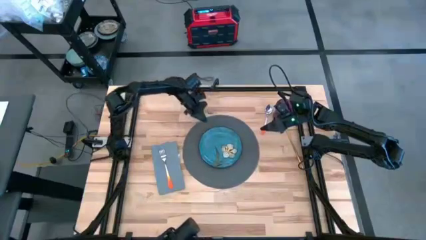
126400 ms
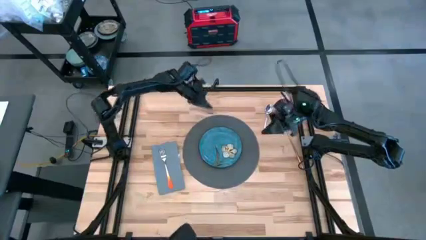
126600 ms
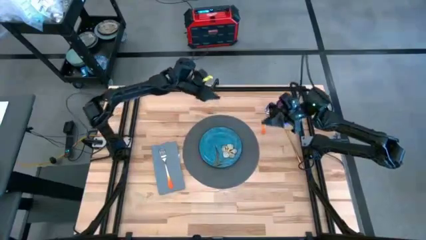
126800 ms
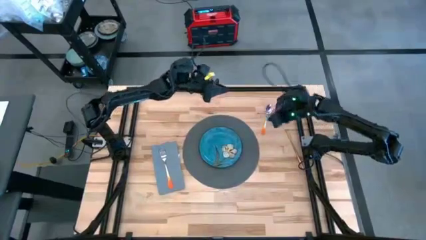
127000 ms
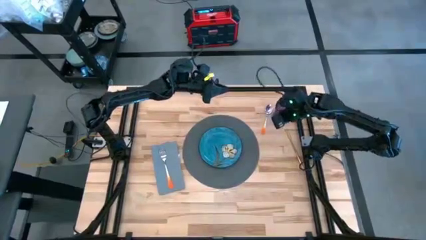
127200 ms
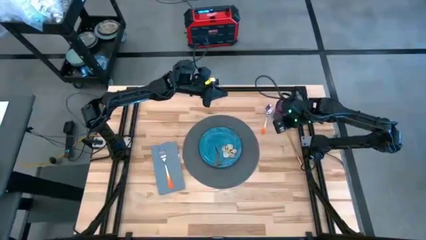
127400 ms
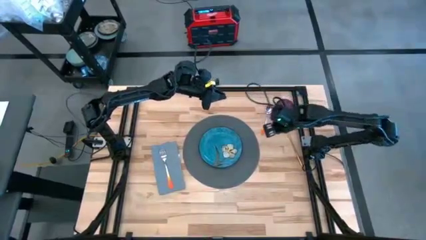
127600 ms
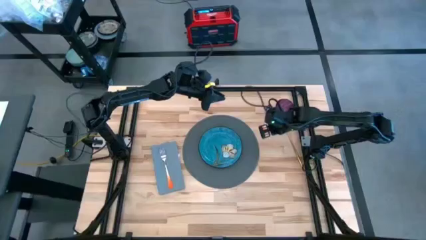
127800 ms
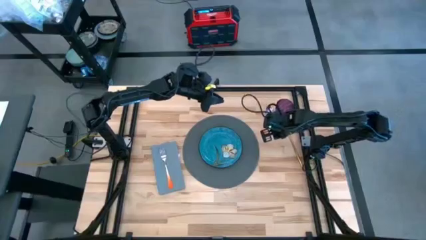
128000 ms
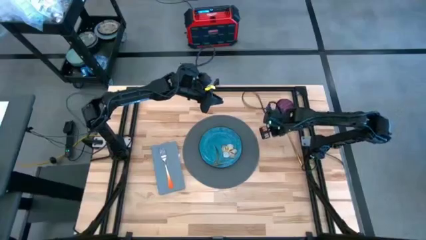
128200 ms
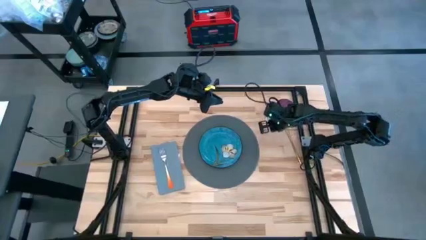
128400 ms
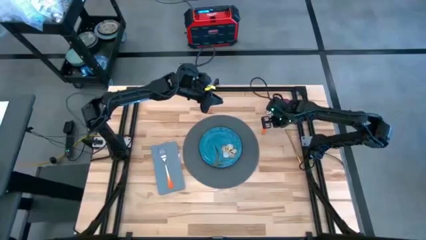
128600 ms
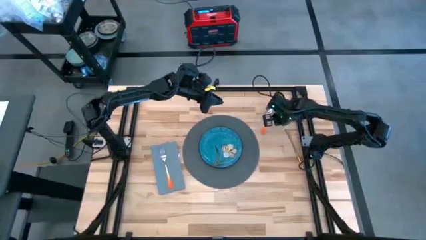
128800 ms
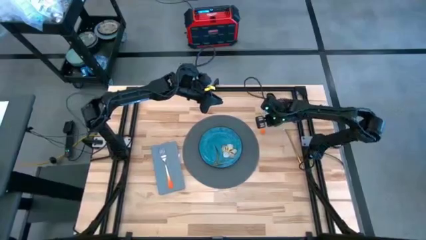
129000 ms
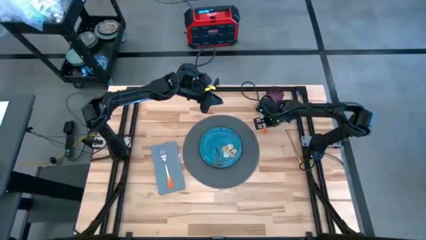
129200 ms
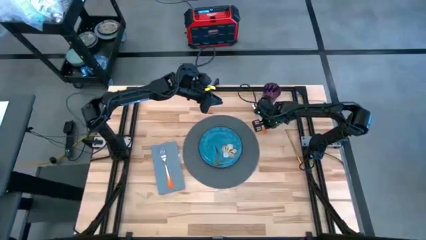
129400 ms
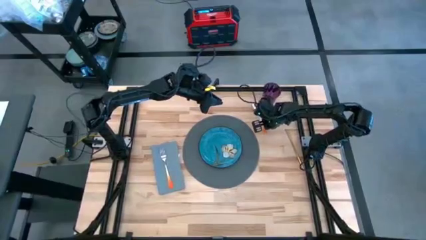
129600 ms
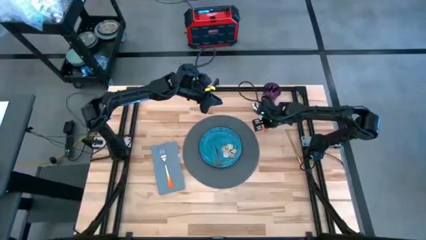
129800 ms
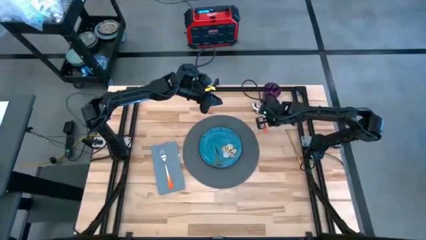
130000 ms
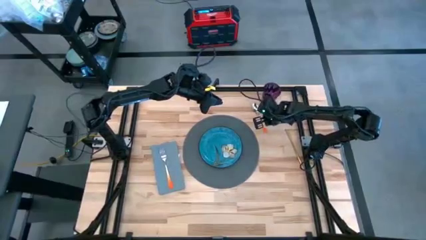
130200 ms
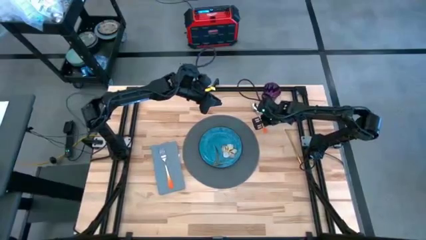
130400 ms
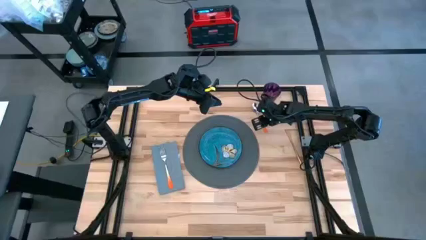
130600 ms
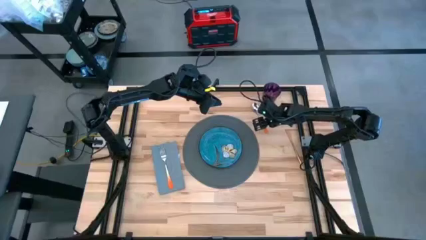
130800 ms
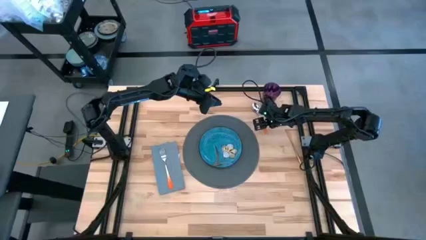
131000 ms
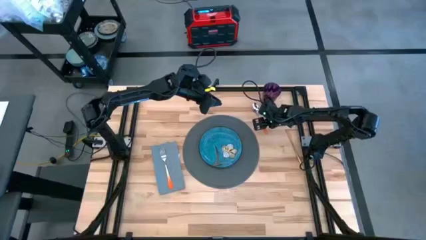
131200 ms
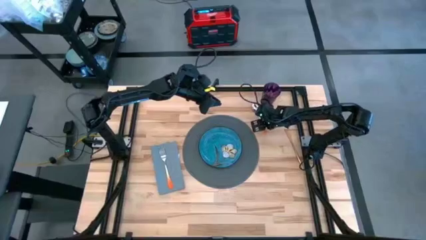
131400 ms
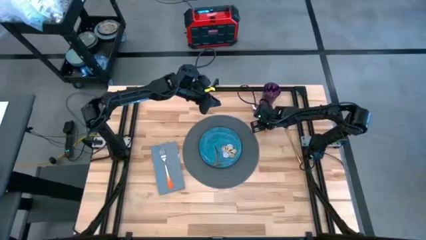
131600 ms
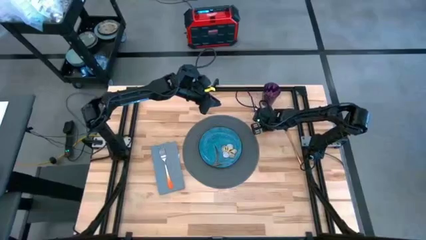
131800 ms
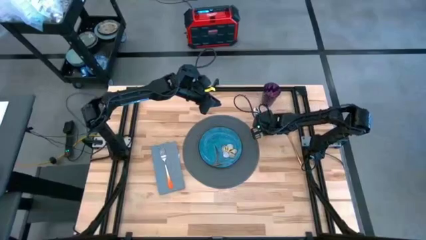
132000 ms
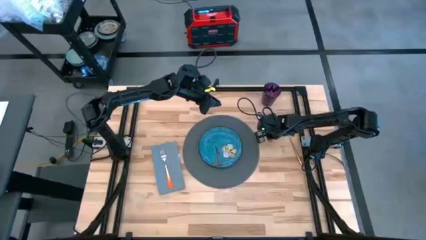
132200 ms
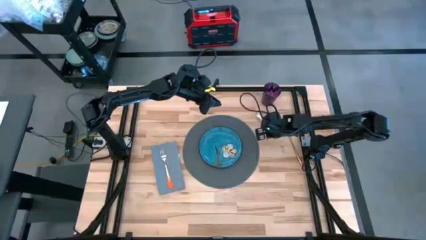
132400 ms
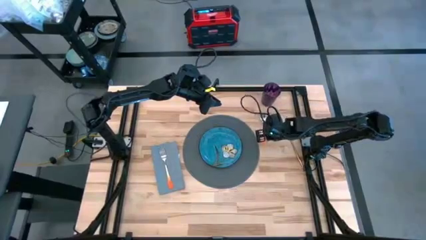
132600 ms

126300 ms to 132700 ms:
Task: Set table place
Put the orange spoon on the right side of the gray placemat

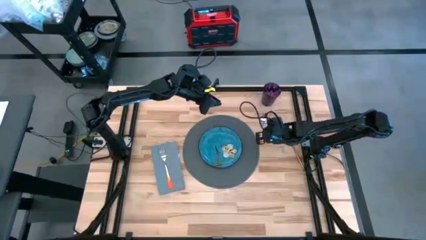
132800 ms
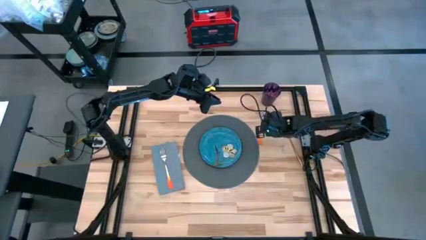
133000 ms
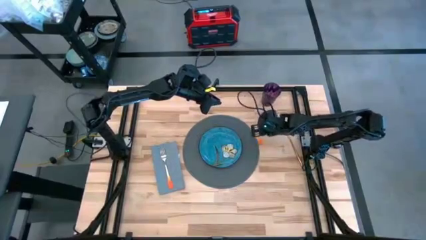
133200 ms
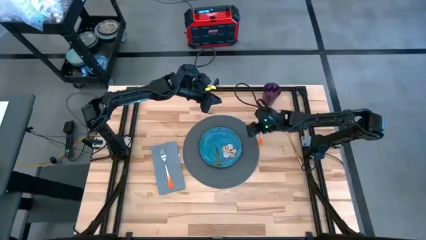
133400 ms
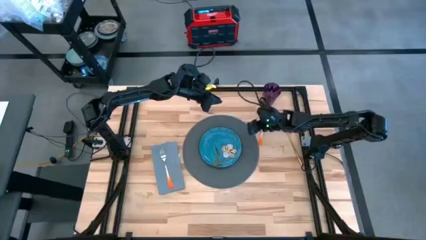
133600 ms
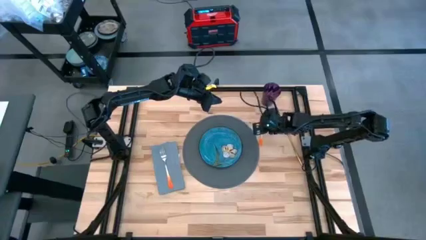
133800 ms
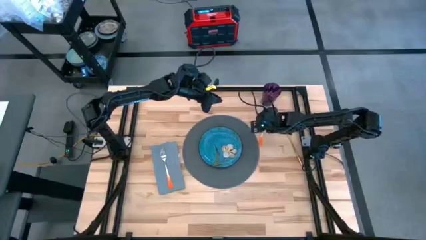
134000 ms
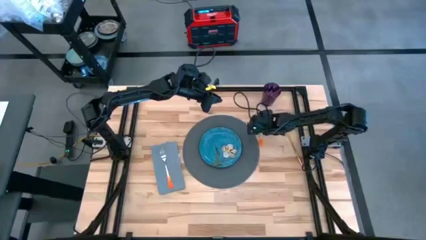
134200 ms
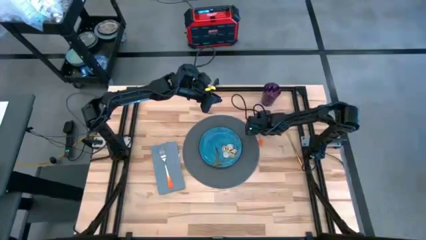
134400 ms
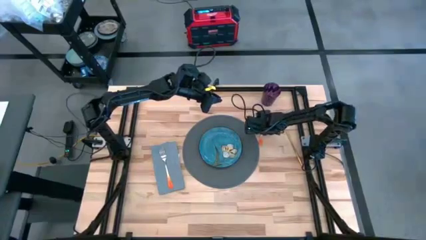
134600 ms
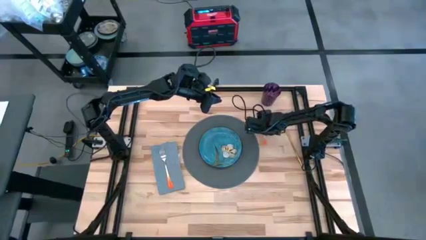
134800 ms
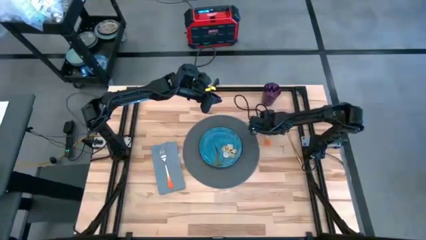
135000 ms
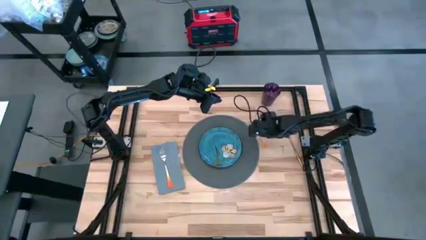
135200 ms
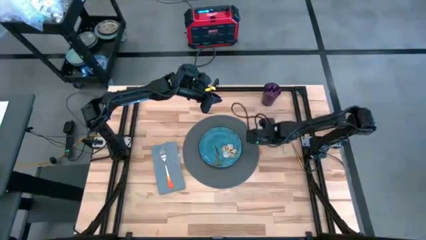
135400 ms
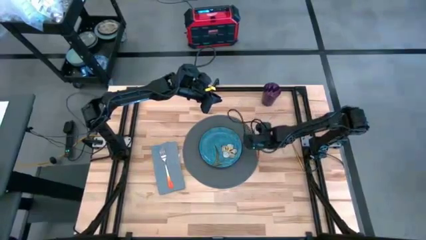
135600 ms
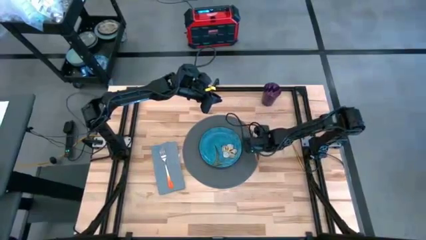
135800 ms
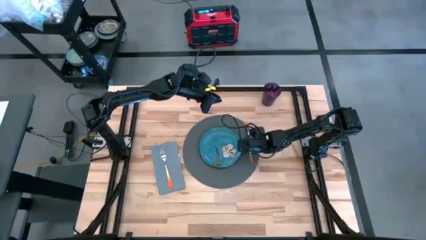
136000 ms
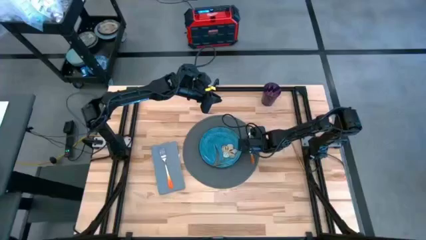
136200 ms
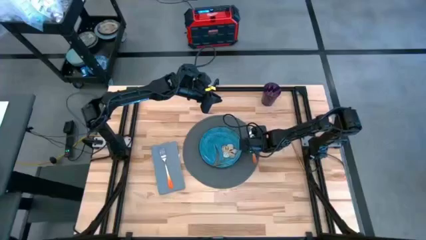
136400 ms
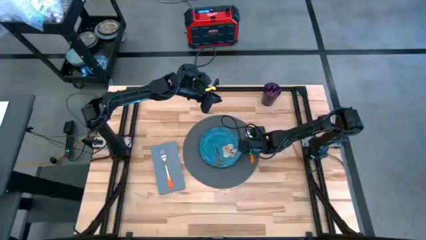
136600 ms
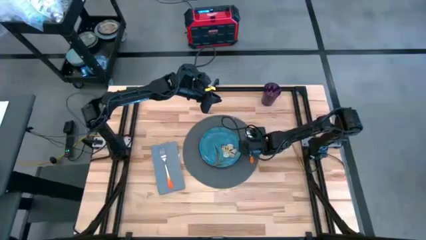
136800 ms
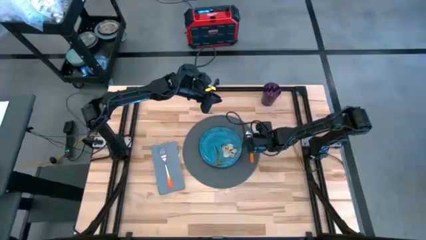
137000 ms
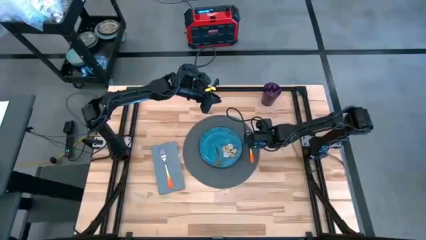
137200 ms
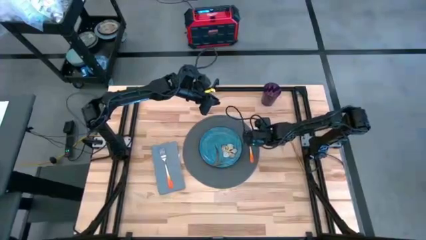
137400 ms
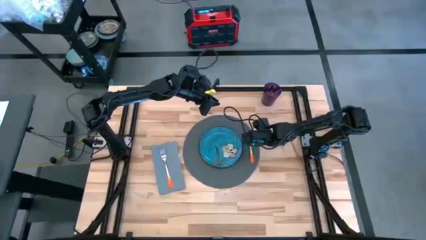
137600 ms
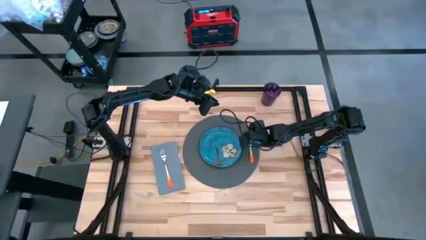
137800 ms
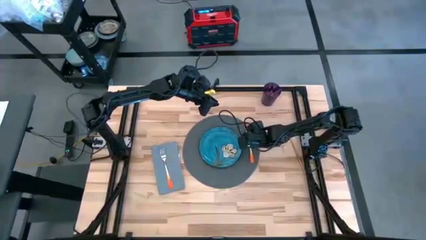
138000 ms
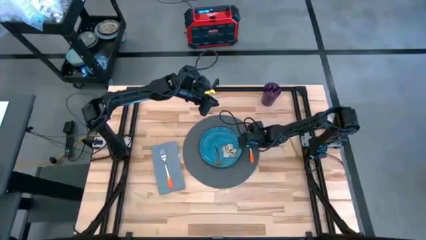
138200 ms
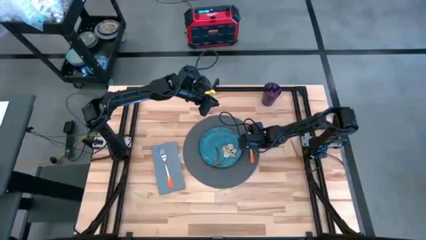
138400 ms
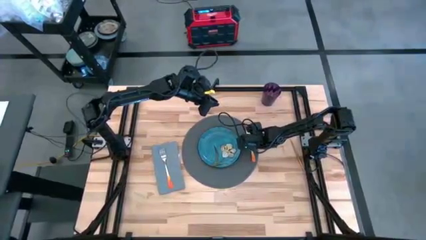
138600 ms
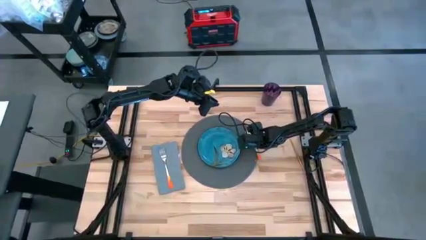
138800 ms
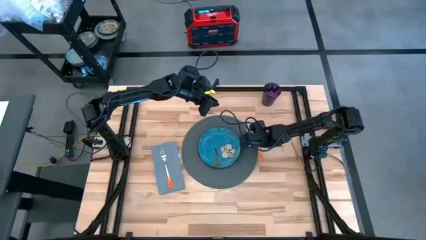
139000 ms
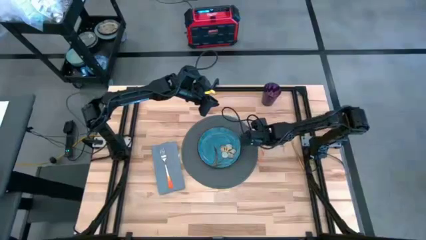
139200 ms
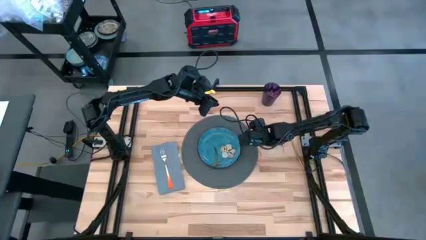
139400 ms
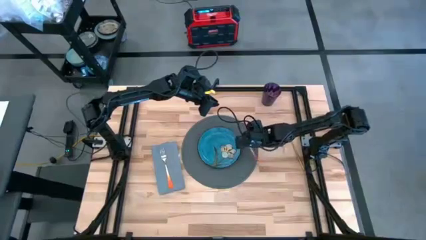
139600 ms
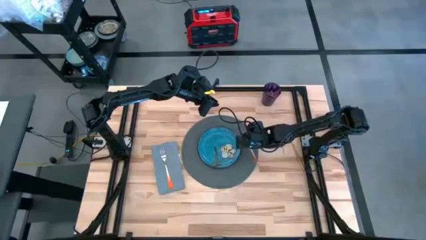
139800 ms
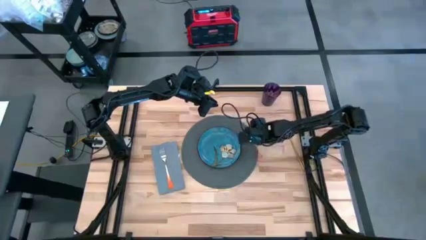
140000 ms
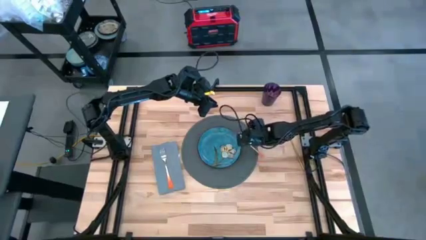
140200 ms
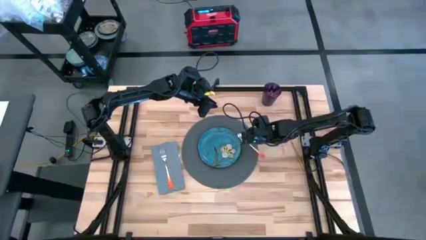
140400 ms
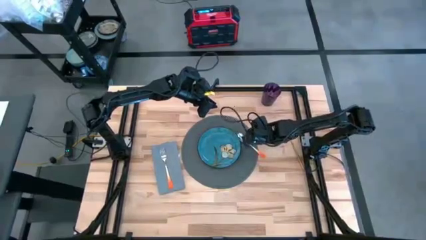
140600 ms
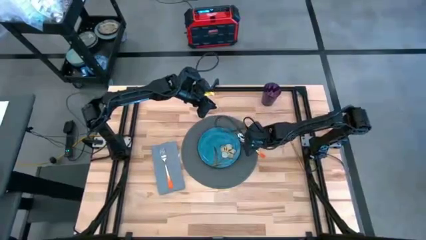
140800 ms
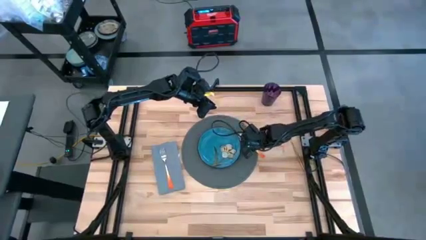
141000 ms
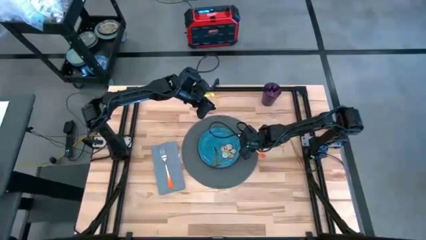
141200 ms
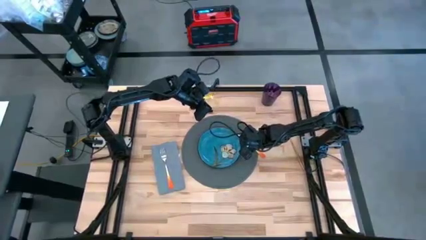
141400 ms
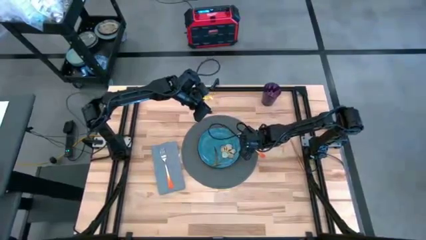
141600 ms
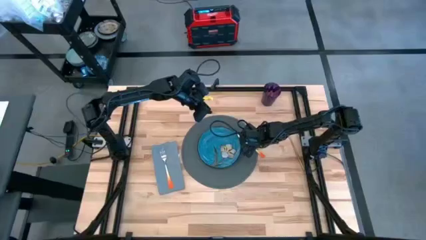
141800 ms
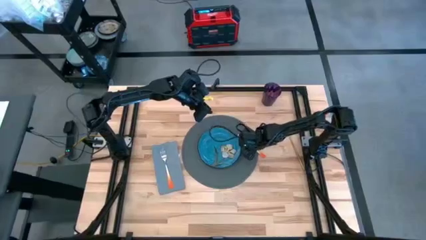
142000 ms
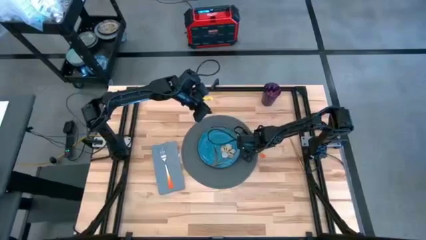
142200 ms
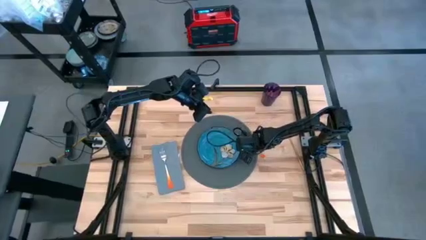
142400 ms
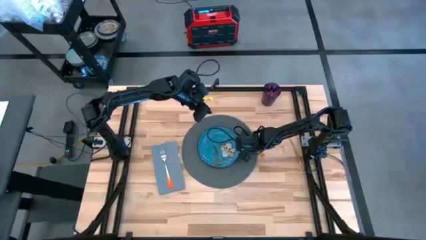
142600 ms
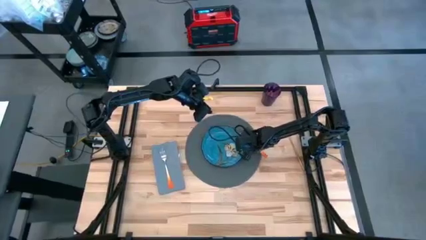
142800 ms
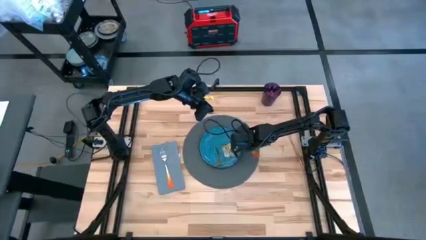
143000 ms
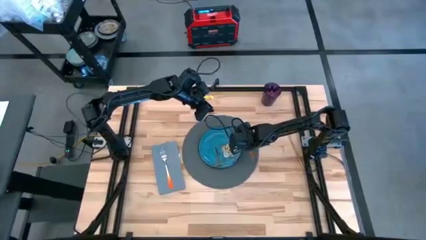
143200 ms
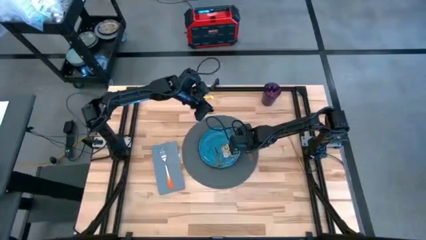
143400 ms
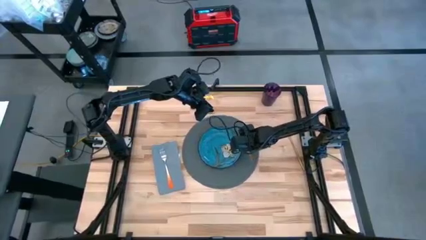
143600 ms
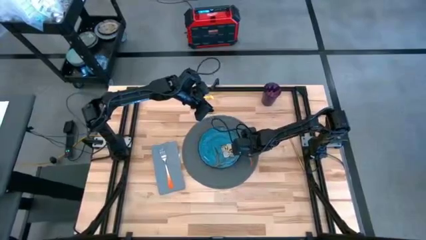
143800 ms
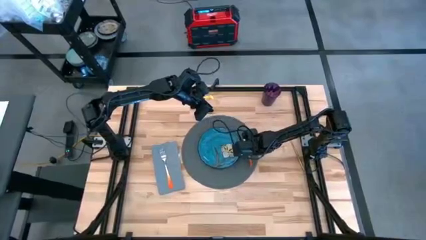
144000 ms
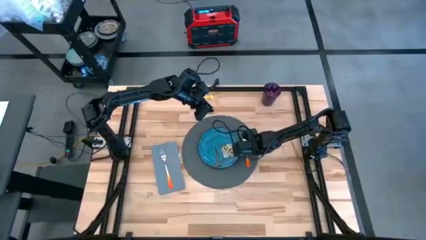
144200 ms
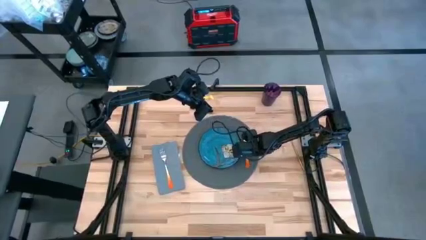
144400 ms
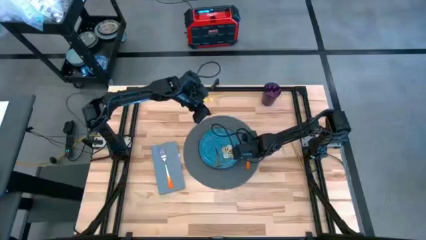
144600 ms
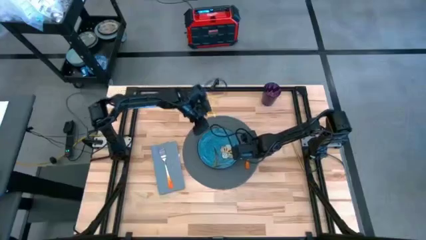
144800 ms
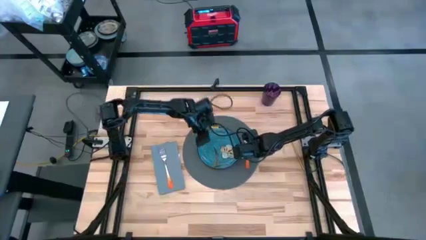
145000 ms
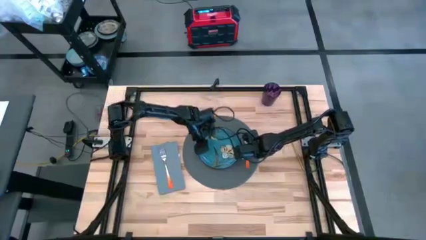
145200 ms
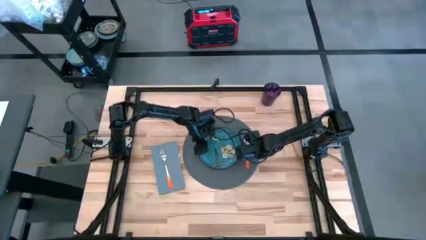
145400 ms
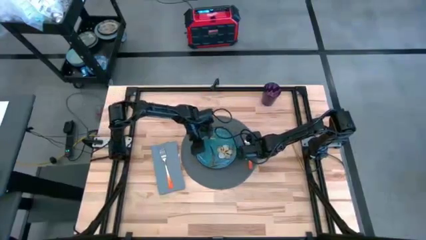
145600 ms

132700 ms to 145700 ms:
Put the orange spoon on the right side of the gray placemat
